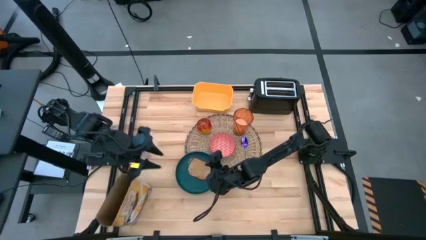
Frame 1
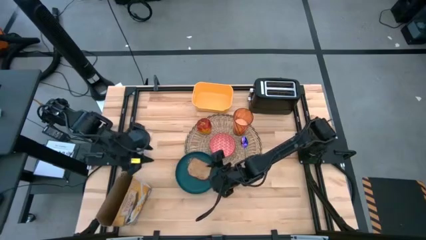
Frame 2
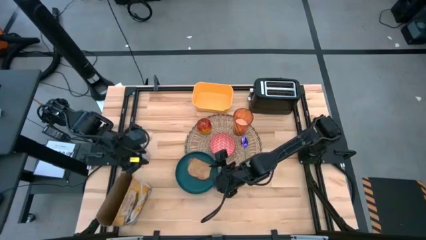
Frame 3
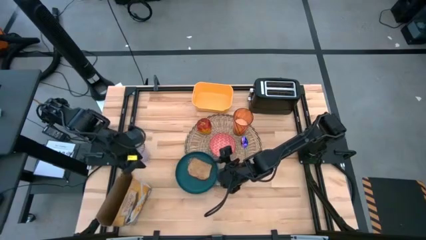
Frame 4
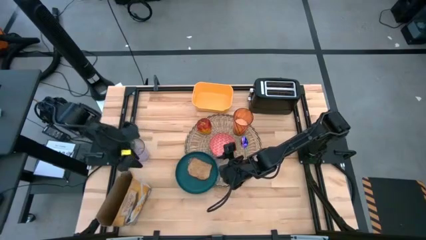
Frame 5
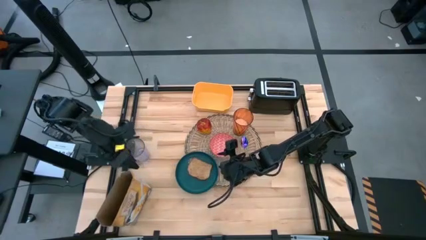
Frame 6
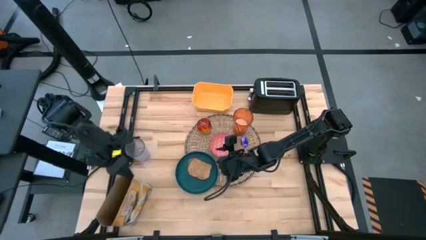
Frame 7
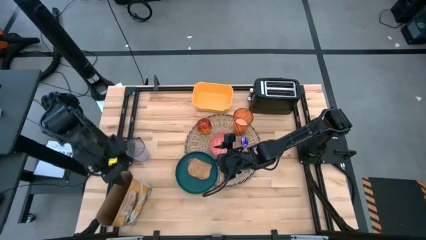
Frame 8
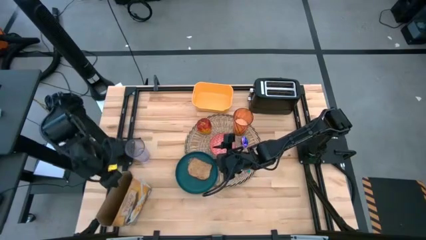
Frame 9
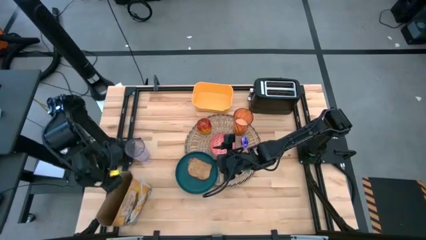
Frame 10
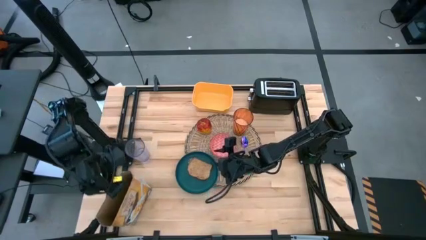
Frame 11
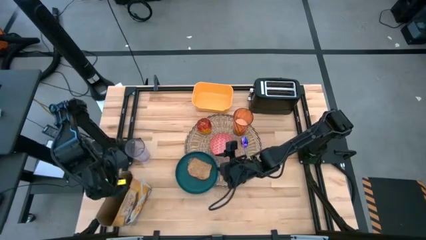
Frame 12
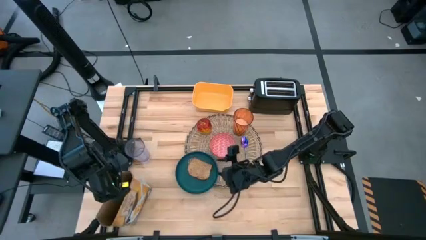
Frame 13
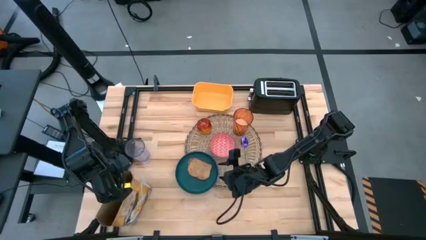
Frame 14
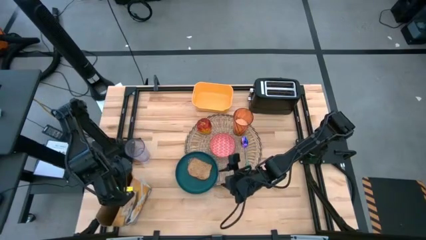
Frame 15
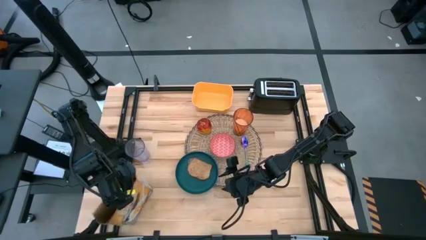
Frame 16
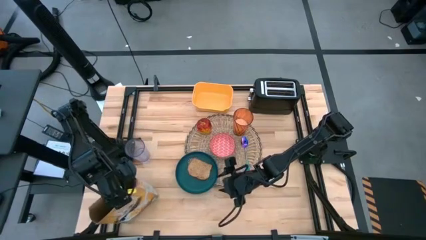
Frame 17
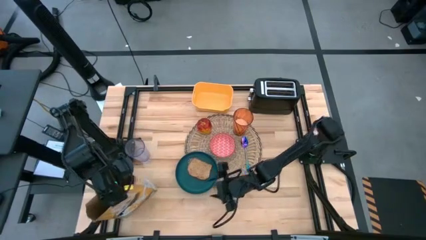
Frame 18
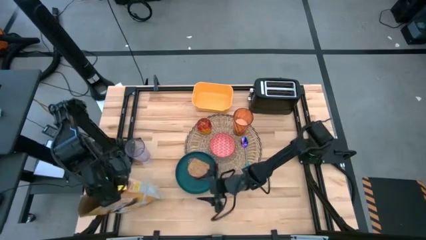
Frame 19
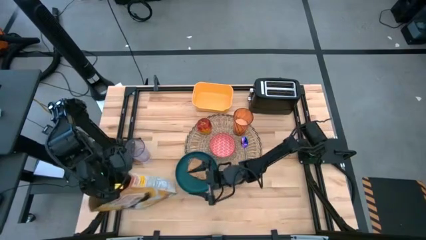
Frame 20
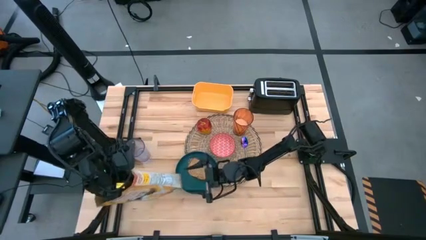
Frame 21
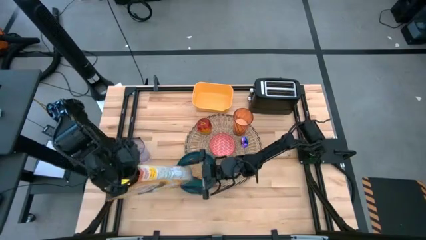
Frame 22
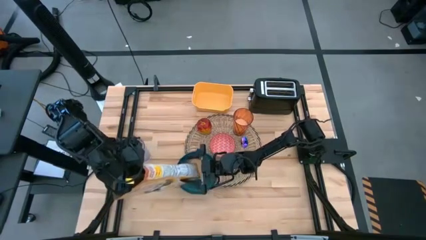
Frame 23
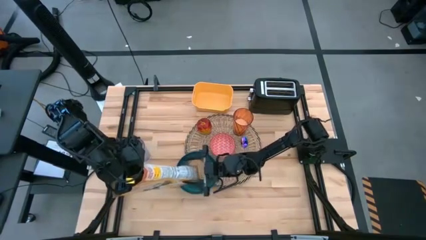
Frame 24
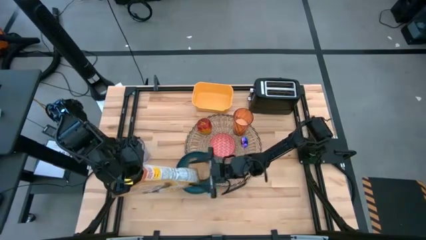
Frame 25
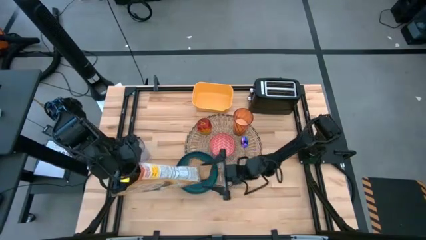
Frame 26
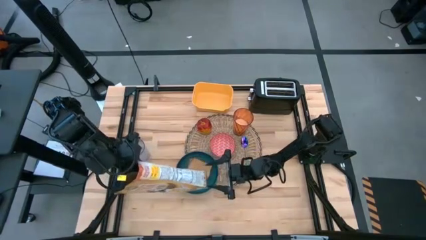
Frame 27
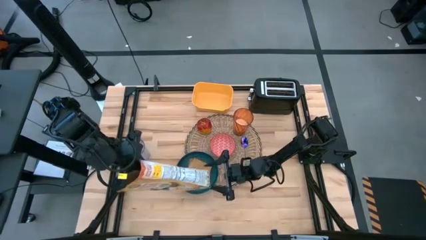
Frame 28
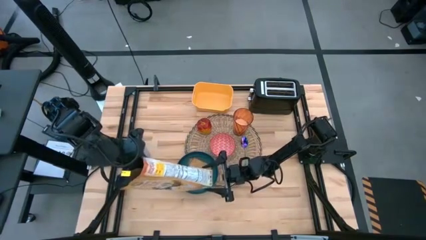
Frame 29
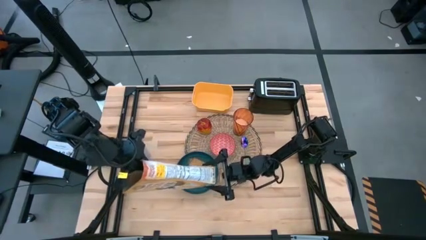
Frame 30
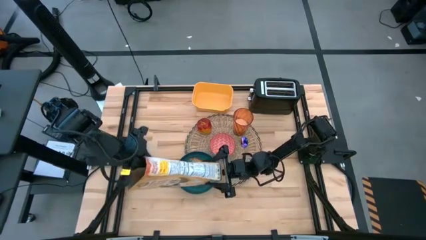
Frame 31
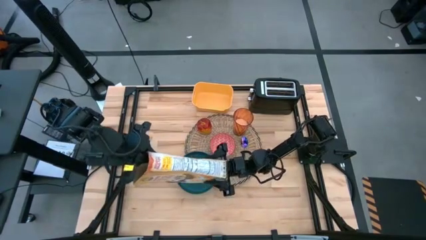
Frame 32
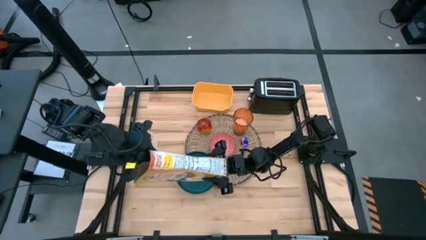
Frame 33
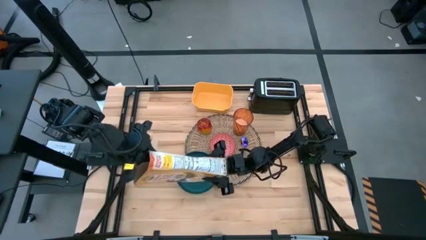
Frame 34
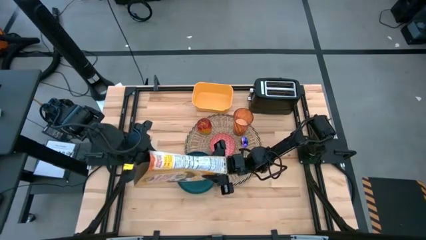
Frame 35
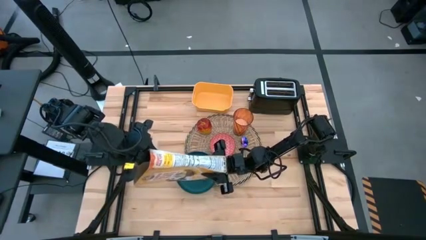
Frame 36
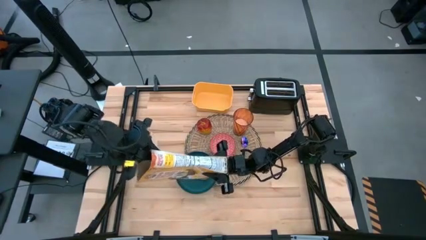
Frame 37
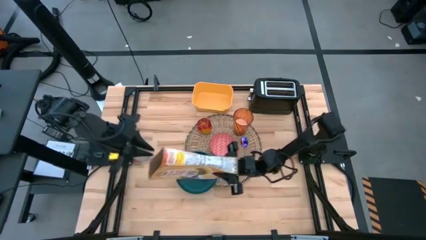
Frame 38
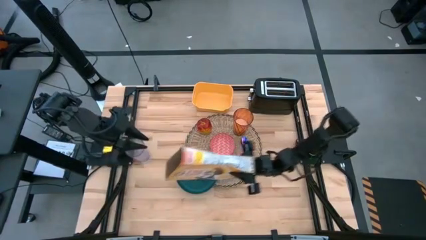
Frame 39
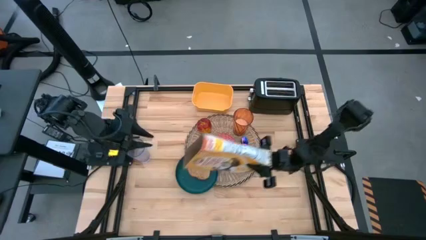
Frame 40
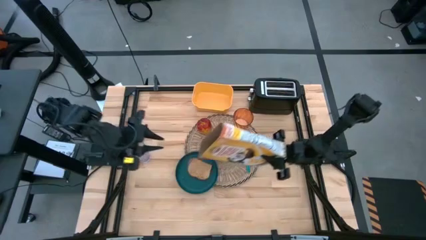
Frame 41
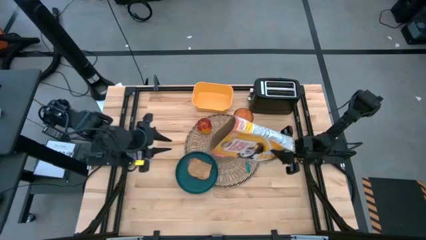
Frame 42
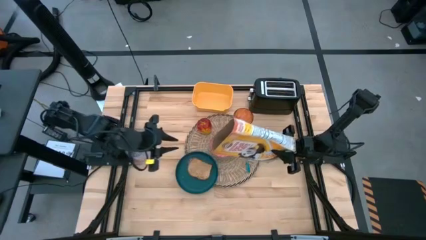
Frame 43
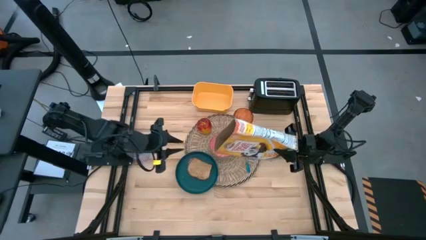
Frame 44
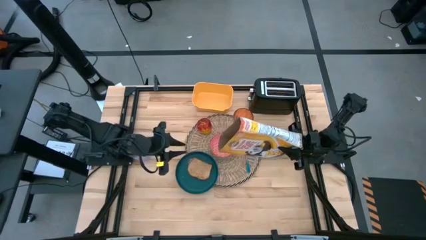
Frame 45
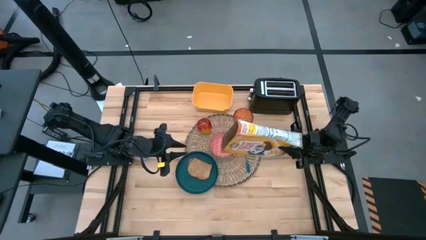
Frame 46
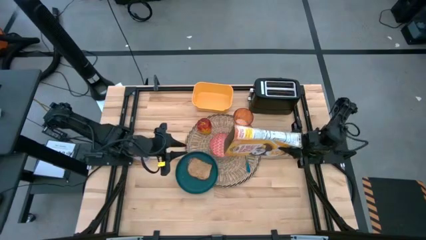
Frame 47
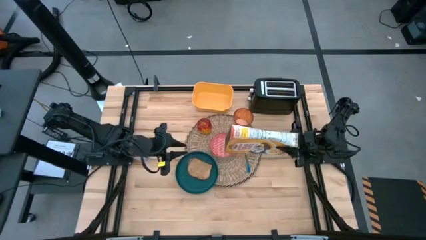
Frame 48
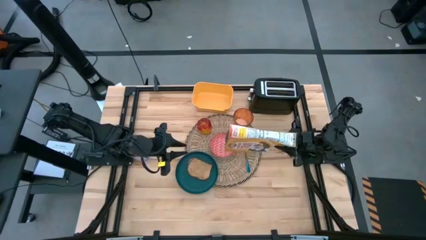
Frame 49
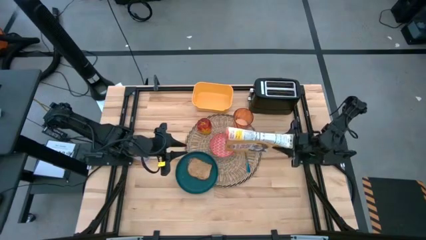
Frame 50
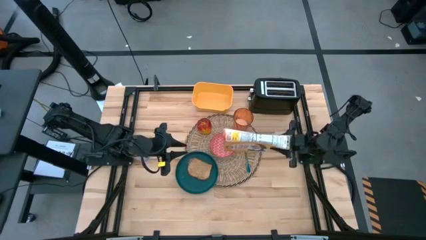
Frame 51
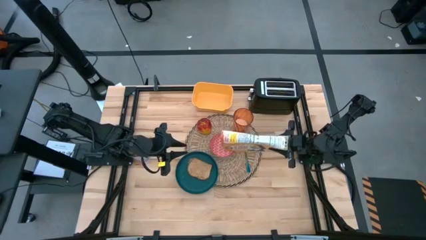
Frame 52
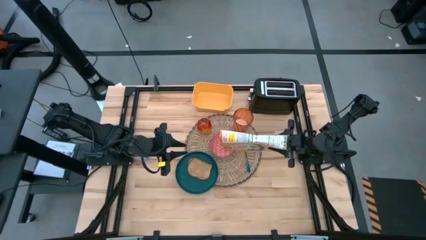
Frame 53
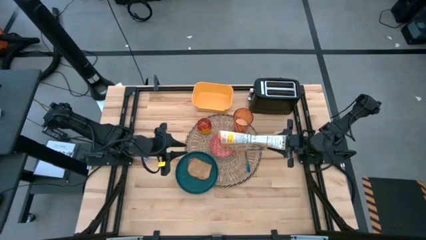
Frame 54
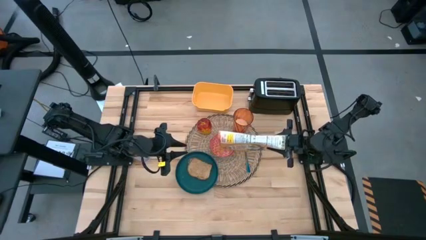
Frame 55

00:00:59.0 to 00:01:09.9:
Task: Arrange a breakfast setting
Pour the cereal into the red bowl

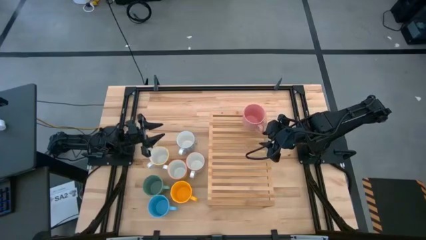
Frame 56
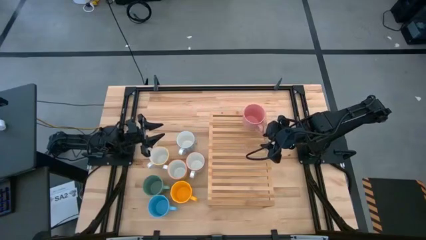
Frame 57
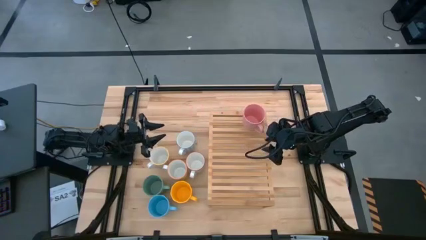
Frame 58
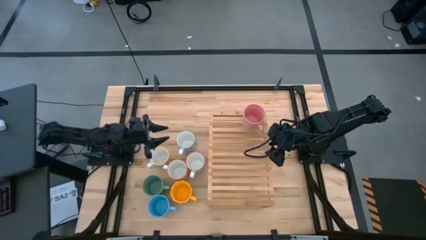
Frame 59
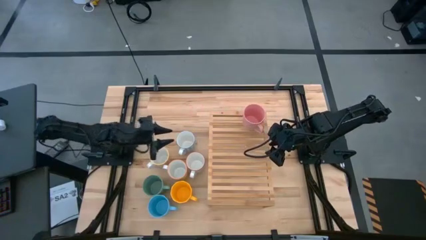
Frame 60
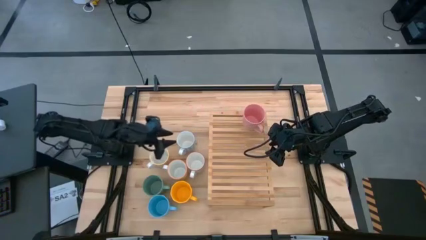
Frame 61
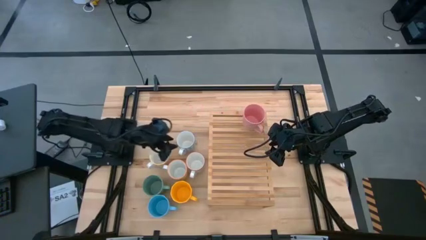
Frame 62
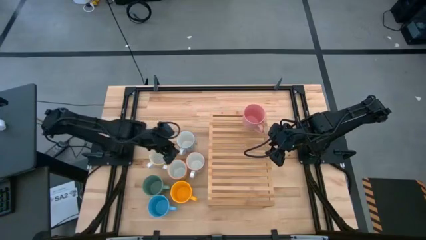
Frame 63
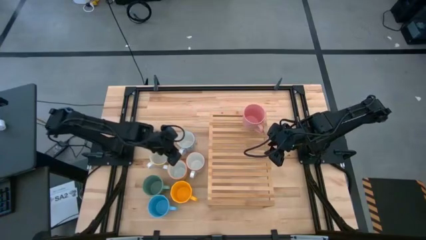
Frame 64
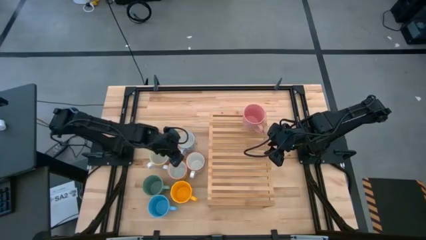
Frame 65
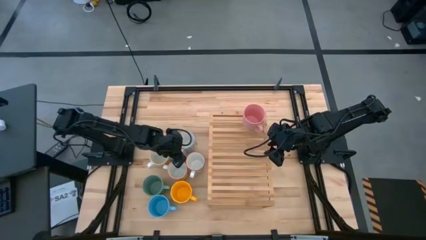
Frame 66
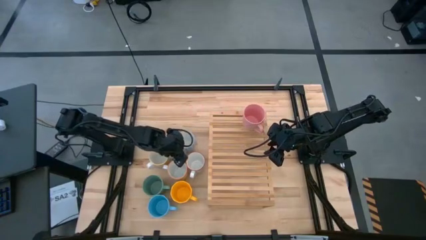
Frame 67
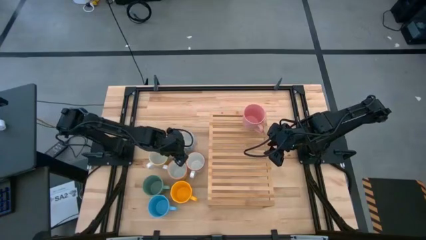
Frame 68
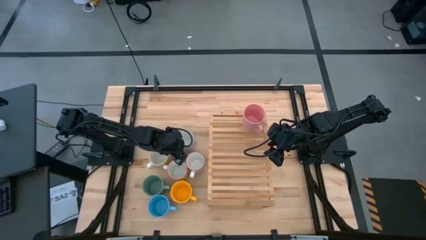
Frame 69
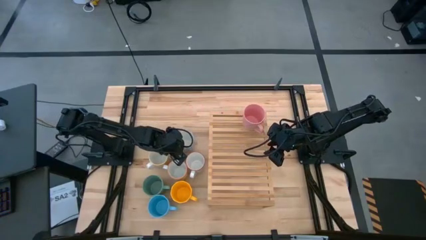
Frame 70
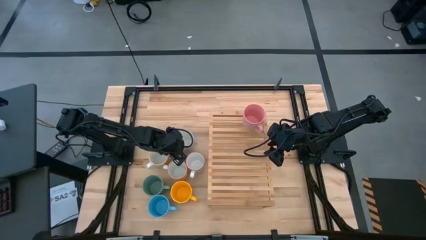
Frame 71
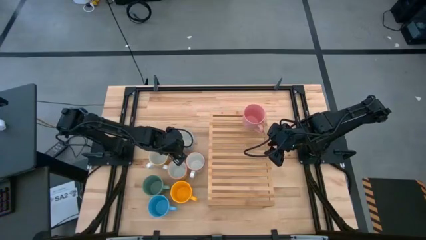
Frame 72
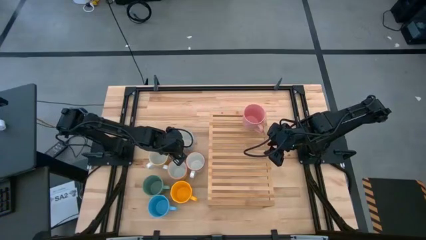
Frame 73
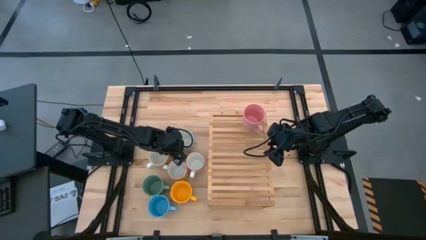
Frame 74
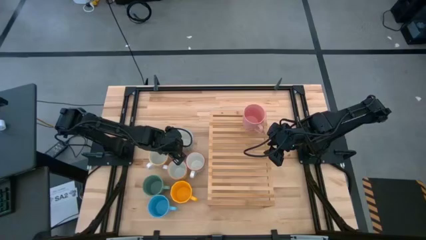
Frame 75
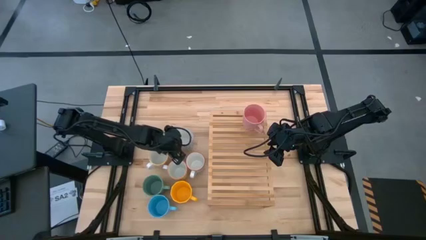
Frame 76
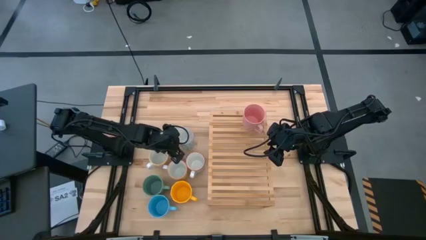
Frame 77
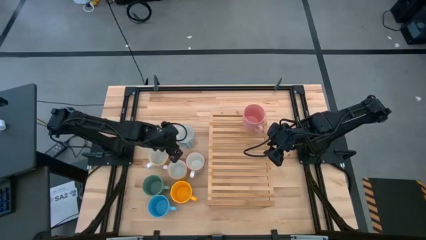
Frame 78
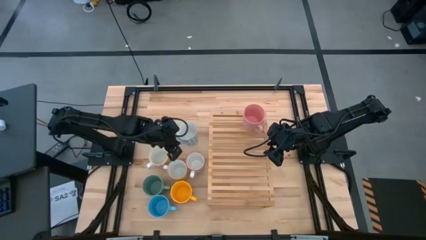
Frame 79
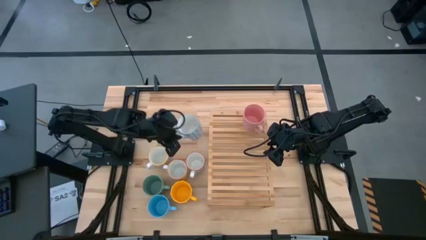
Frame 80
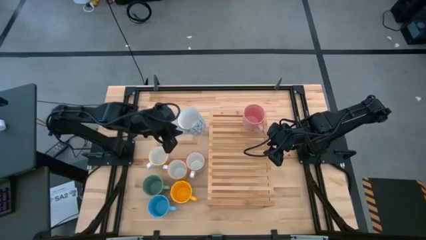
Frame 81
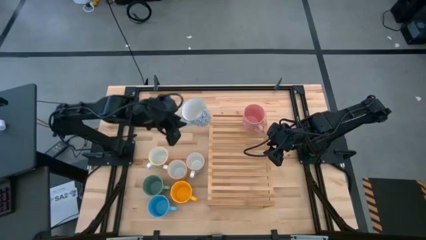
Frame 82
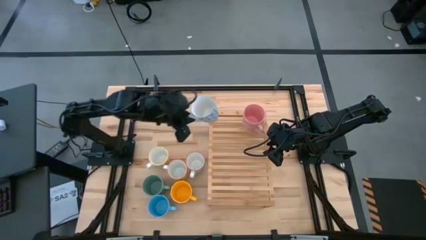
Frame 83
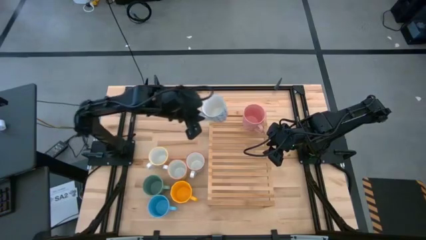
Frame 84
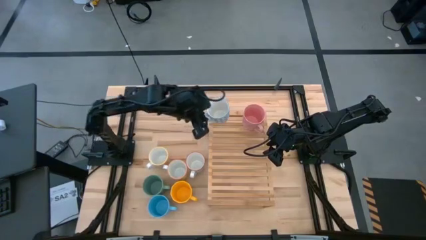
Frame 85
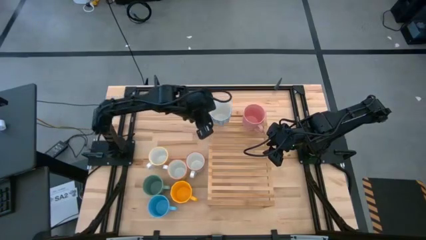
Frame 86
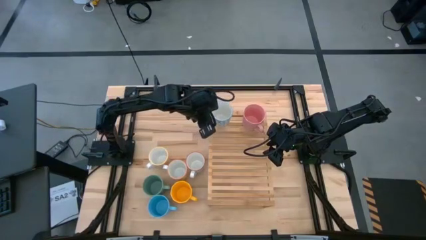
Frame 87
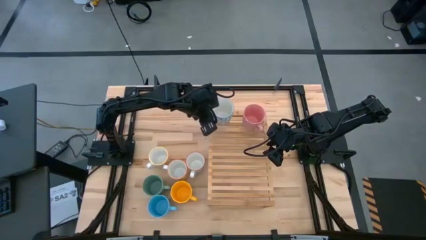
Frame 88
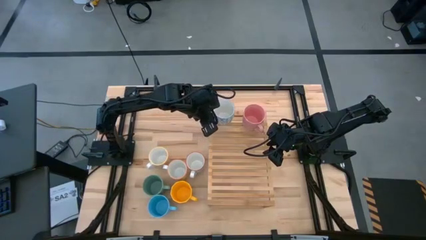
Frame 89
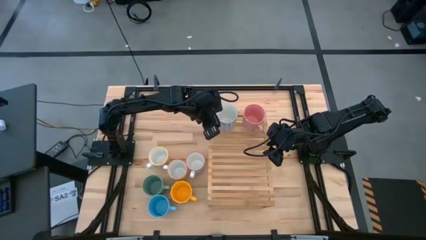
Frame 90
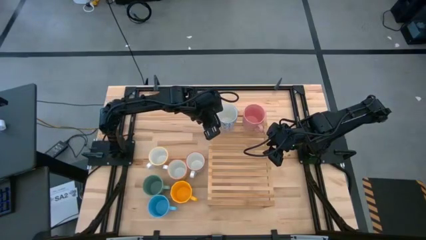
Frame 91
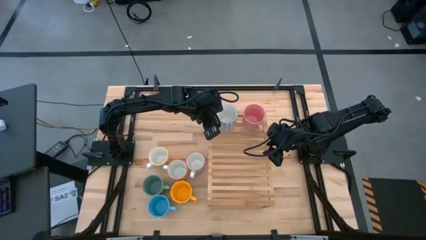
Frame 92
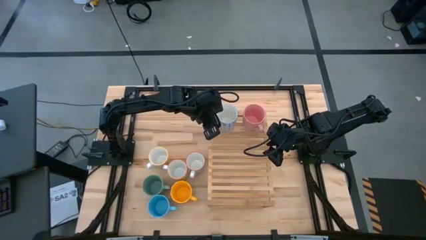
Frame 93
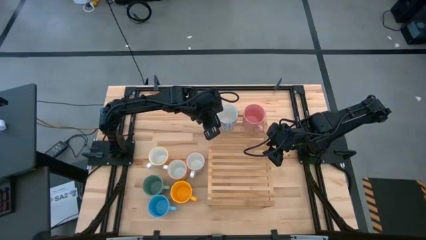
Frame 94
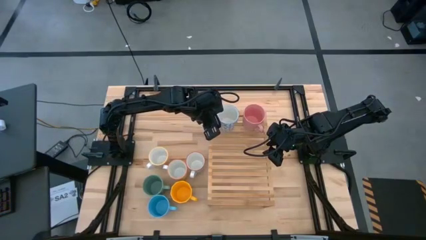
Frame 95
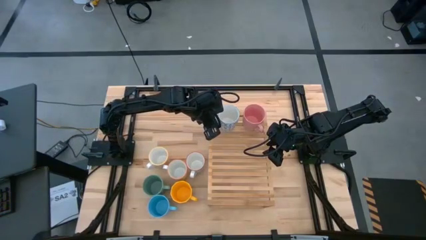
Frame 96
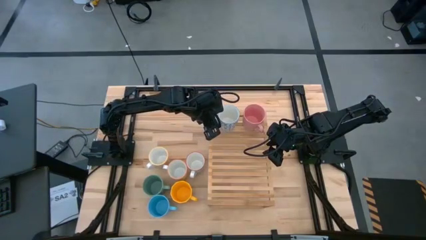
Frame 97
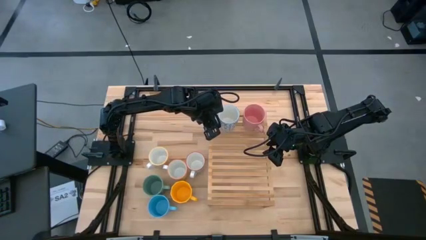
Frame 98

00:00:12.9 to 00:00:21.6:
Task: Place coffee mugs
Put the white patterned mug on the shelf
